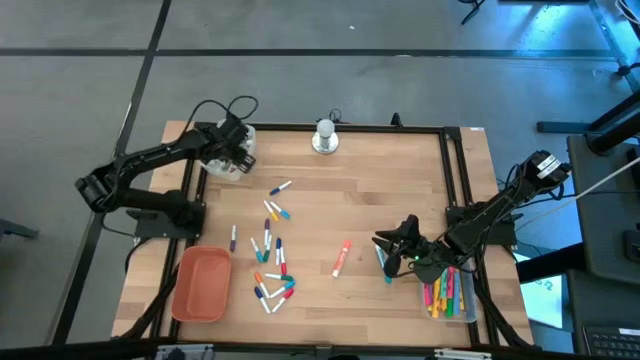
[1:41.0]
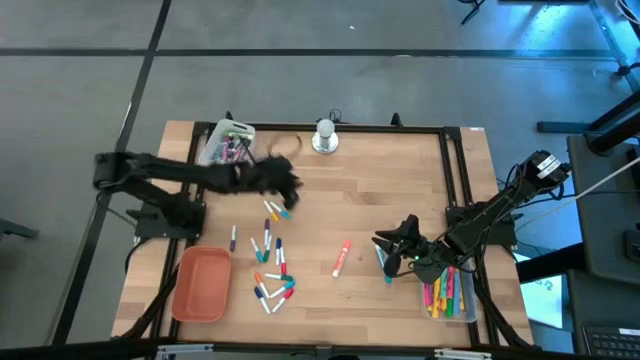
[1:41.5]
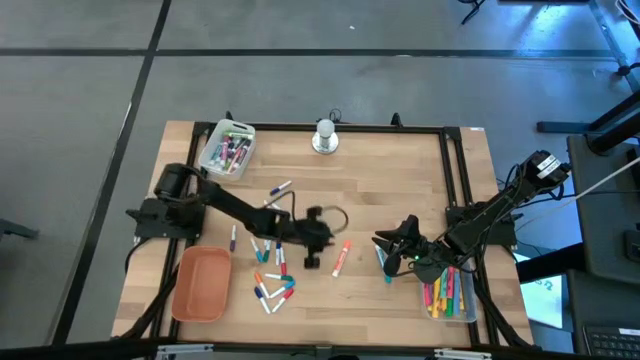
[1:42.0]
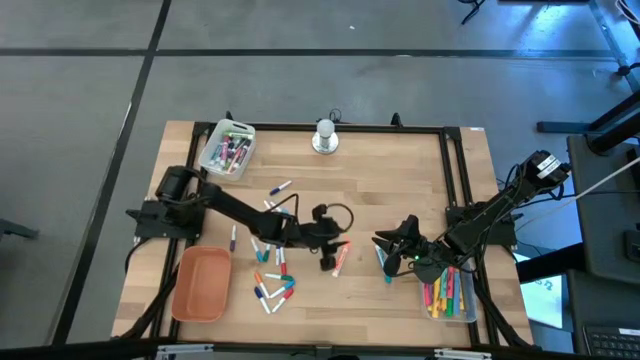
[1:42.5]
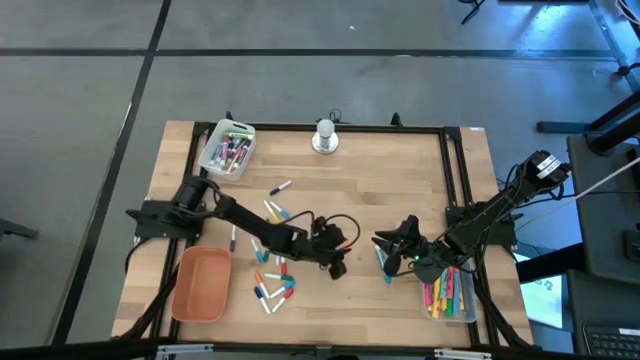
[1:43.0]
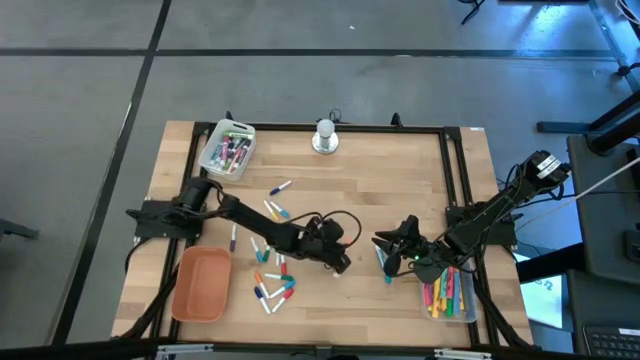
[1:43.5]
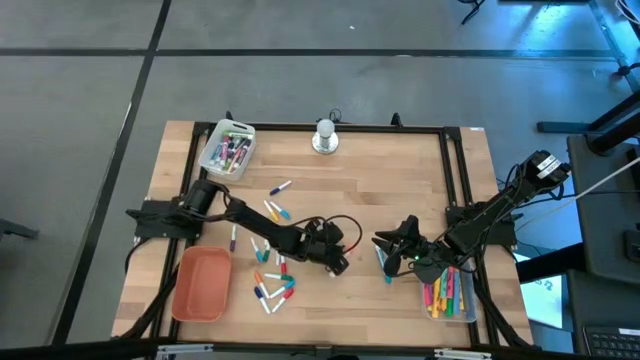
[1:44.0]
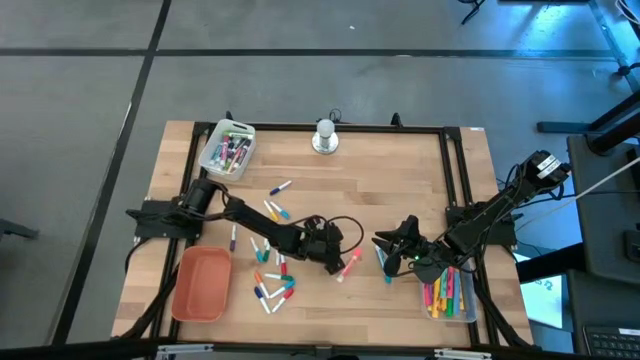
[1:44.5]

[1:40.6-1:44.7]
Task: Pick & Place Markers
Put the orange marker pen into the white bin

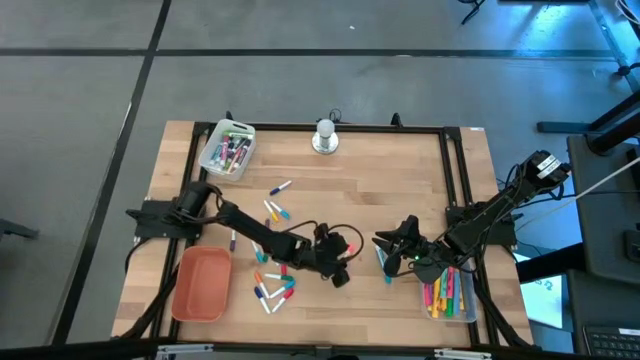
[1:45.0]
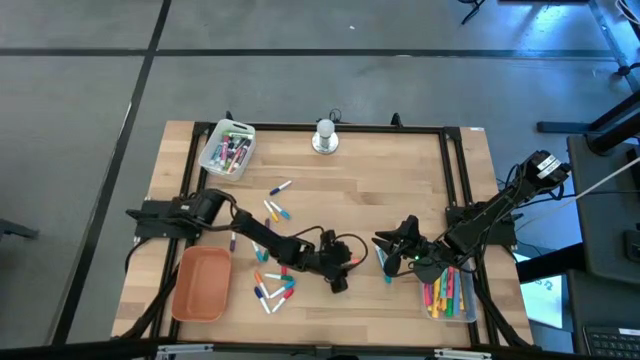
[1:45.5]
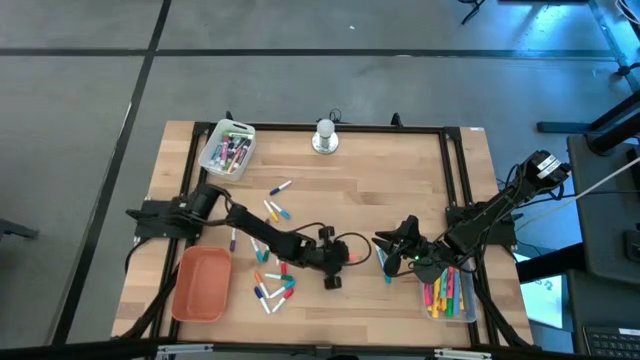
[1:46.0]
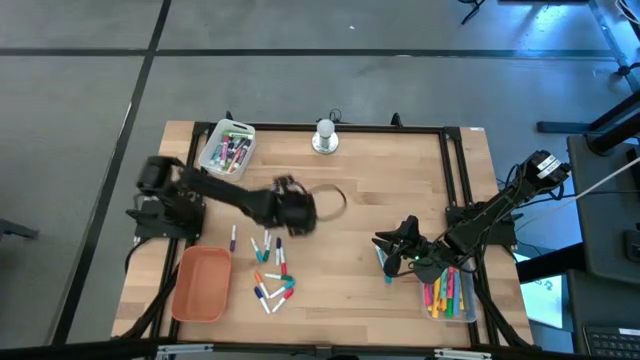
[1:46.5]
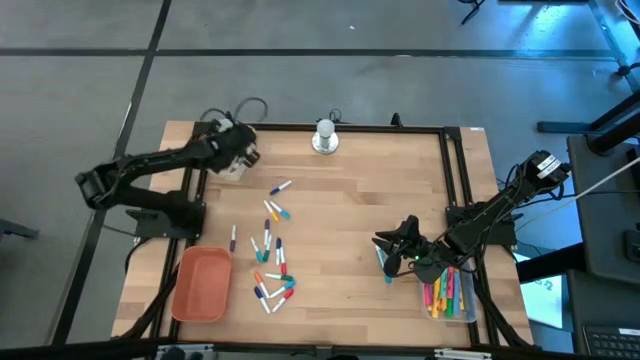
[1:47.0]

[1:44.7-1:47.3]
Put the orange marker pen into the white bin

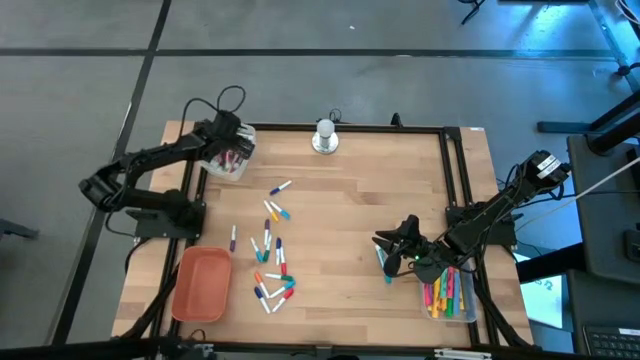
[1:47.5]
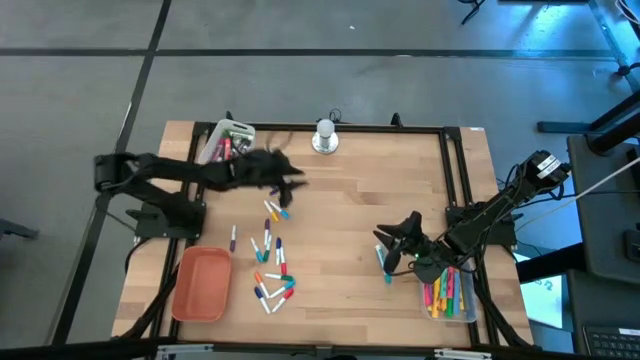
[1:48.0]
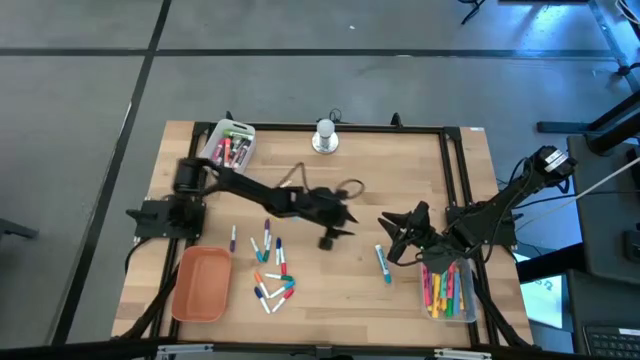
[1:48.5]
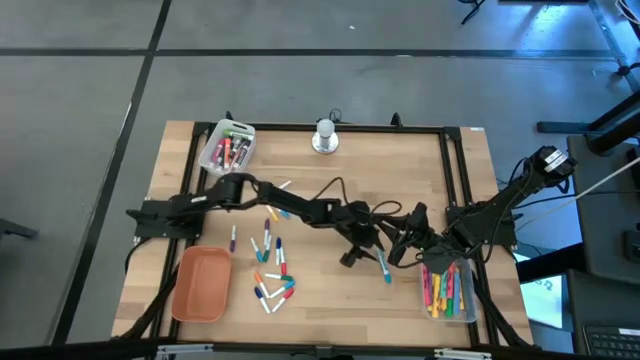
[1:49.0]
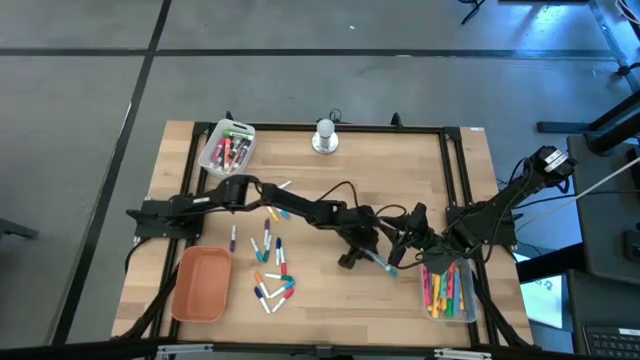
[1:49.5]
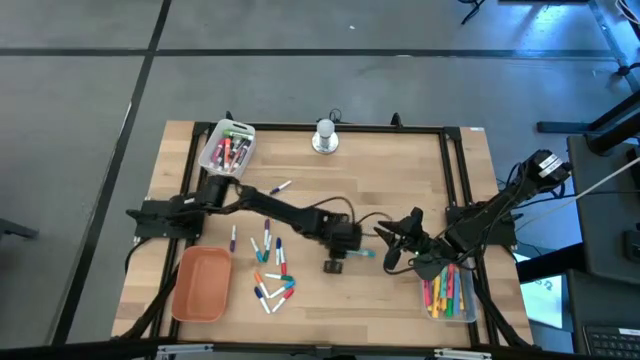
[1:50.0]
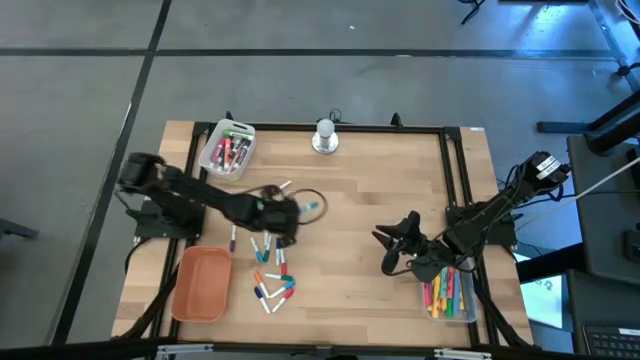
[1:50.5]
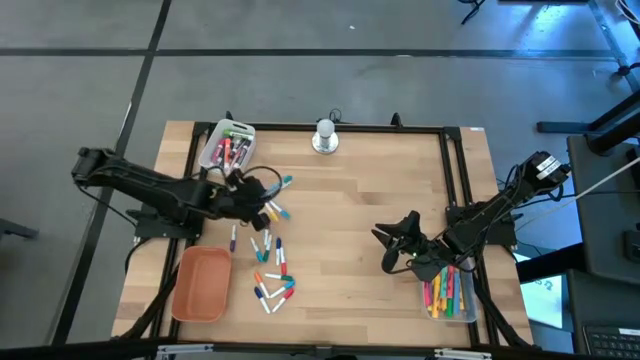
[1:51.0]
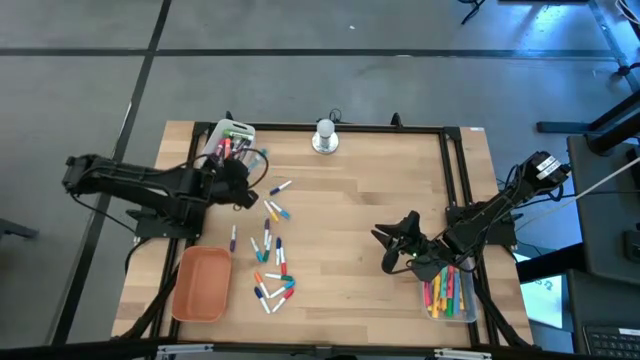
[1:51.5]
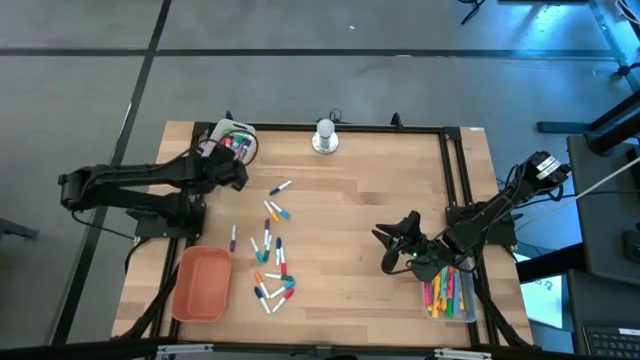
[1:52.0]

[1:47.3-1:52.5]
Put the light blue marker pen into the white bin

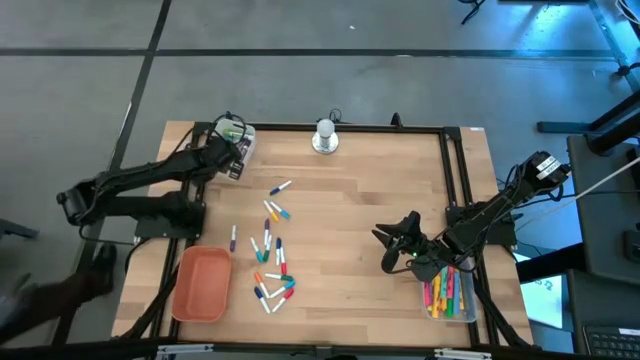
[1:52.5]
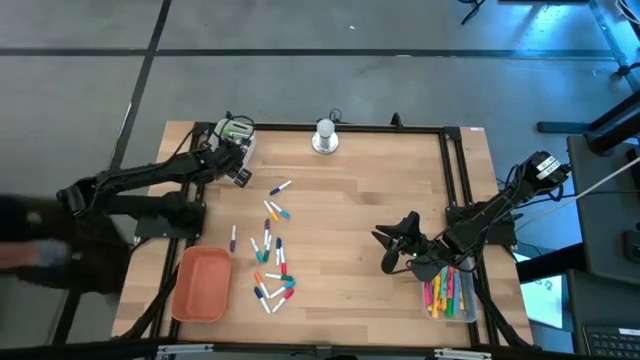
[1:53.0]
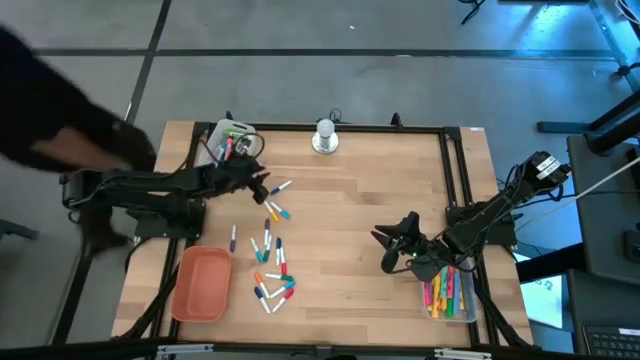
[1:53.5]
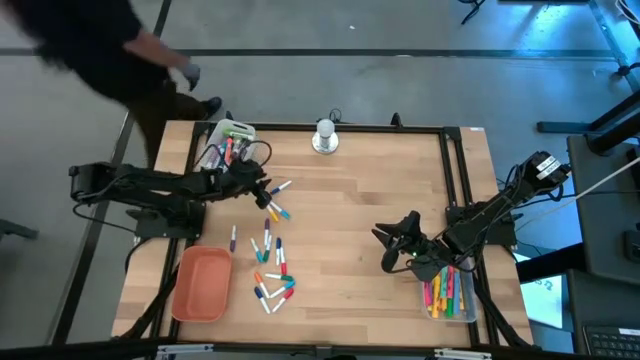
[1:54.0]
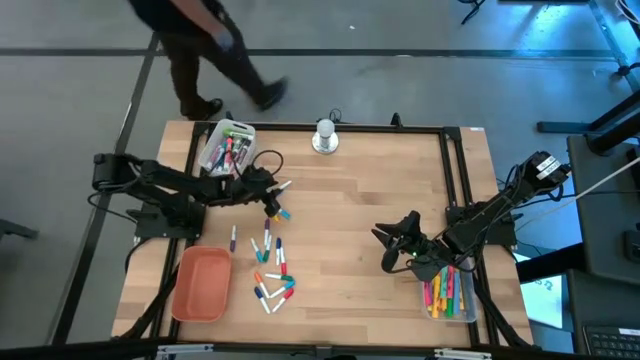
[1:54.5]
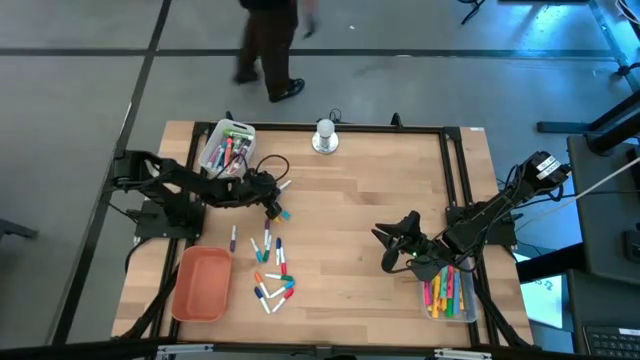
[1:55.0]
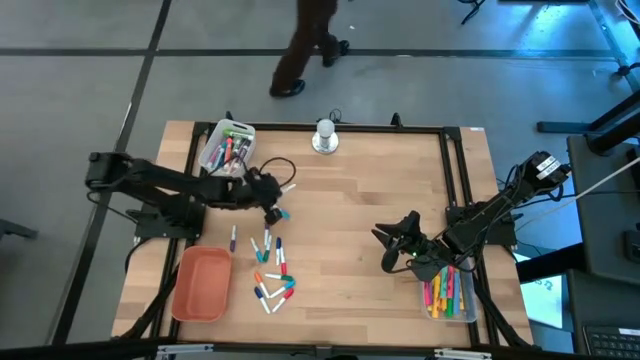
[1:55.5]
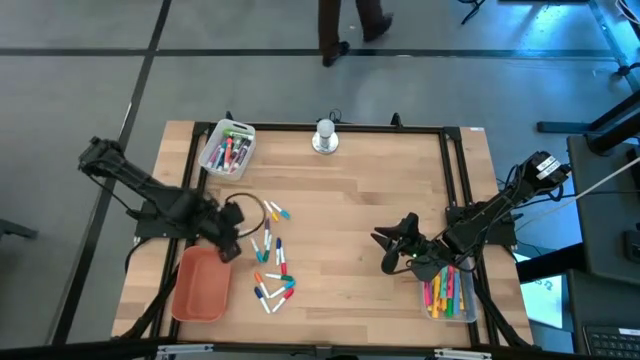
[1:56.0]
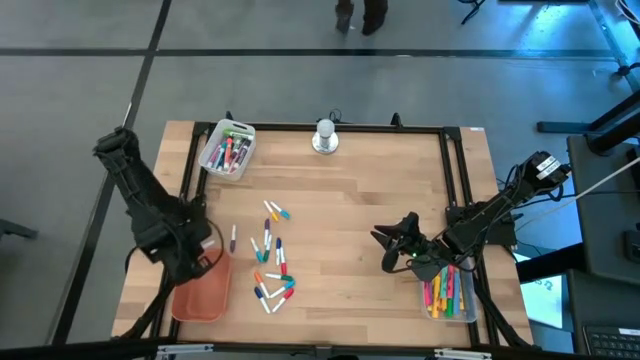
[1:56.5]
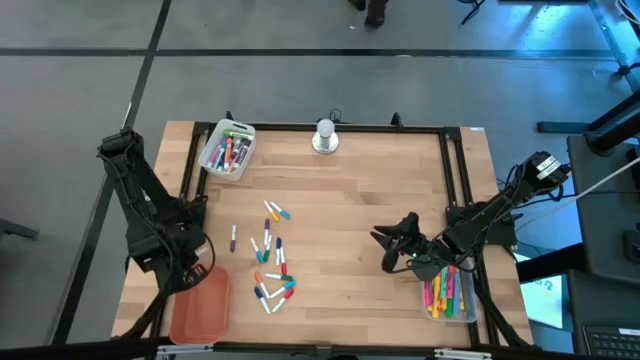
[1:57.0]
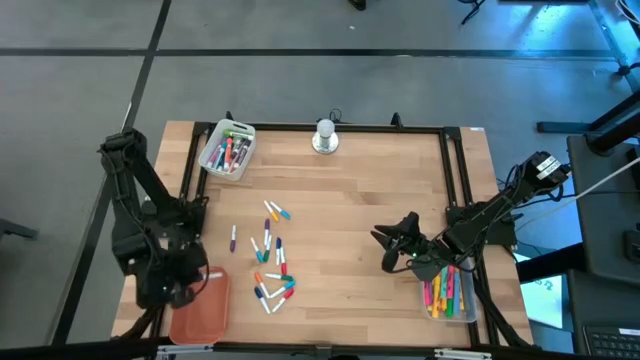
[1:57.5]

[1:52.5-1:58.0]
Put the blue and white highlighter pen into the orange bin

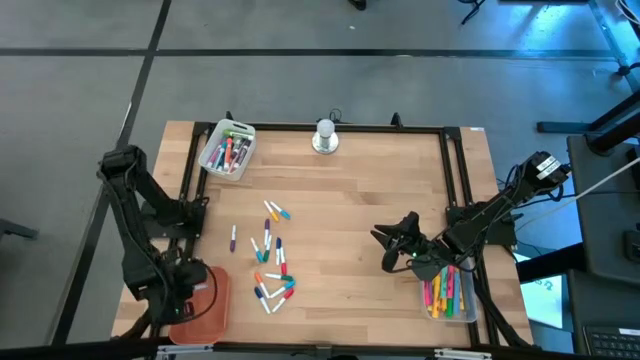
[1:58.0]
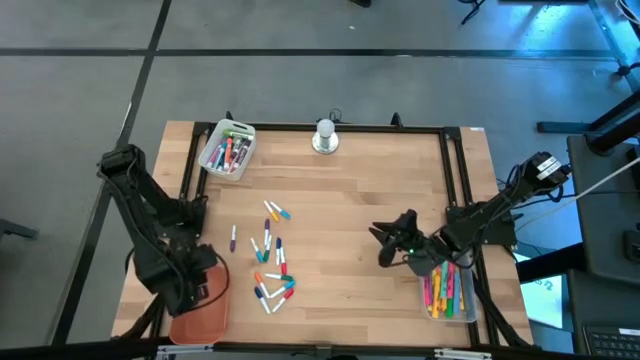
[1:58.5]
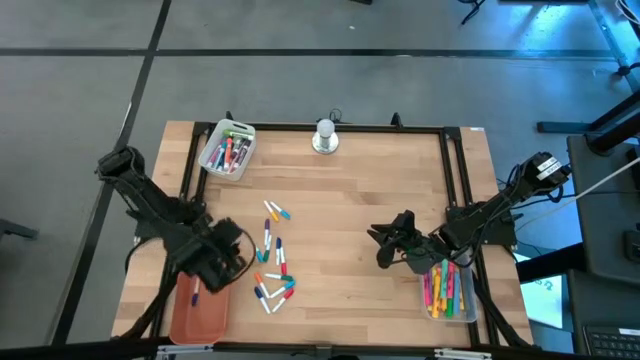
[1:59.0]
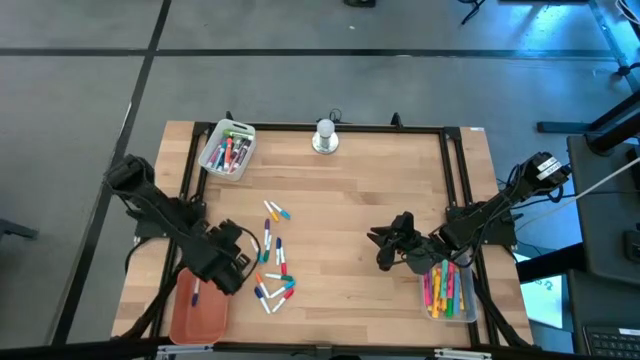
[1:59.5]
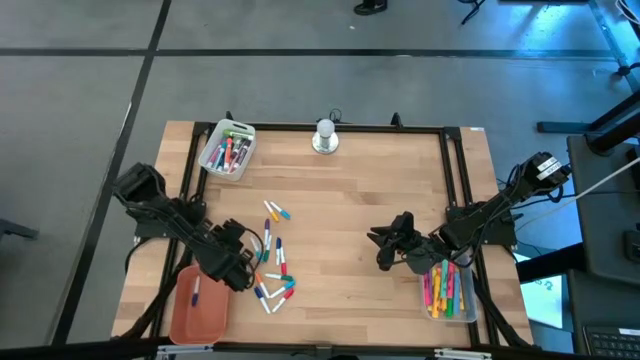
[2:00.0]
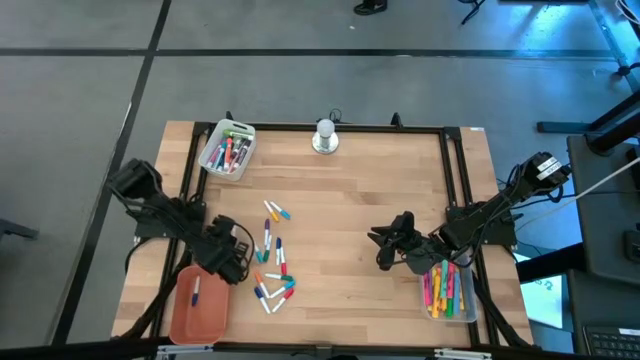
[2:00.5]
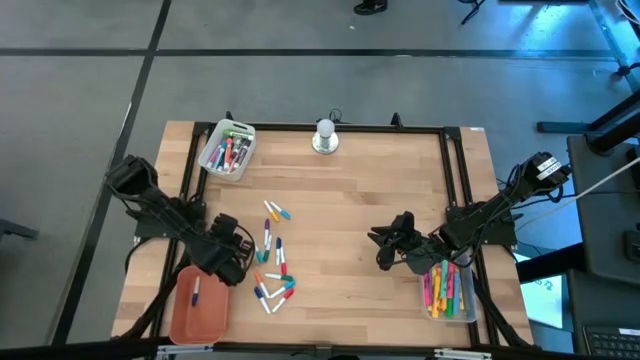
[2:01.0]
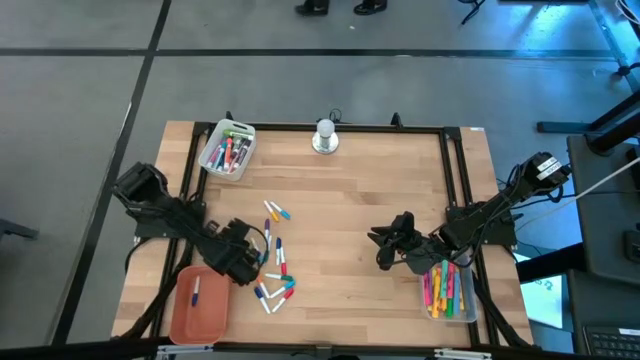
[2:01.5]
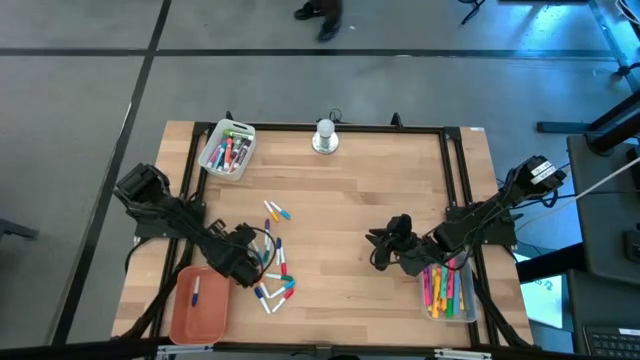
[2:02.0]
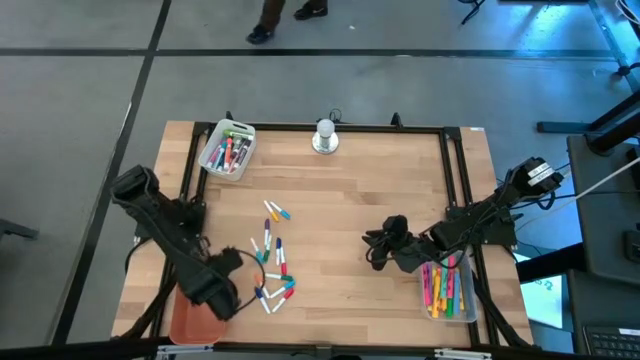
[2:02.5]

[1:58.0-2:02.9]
Put the dark blue and white highlighter pen into the orange bin
